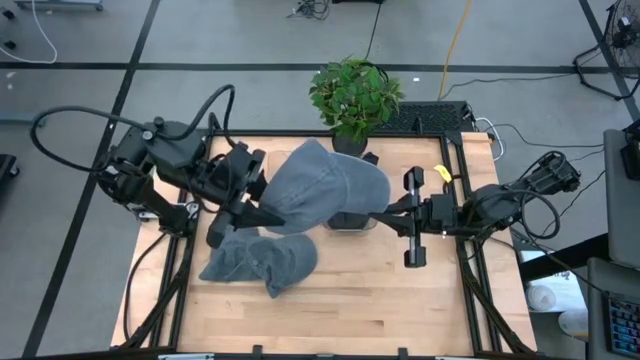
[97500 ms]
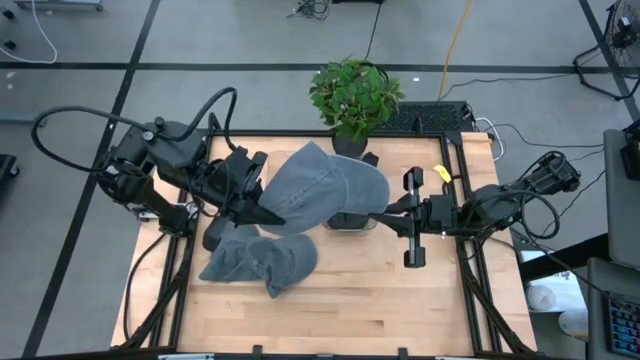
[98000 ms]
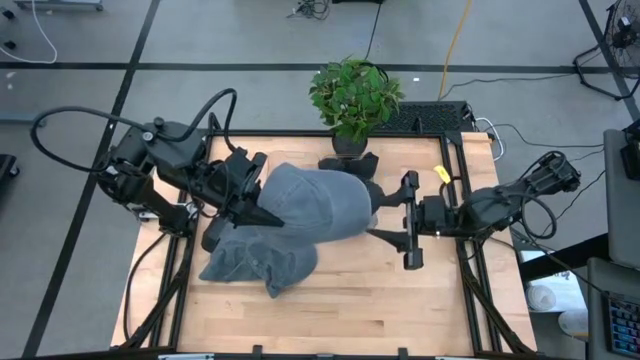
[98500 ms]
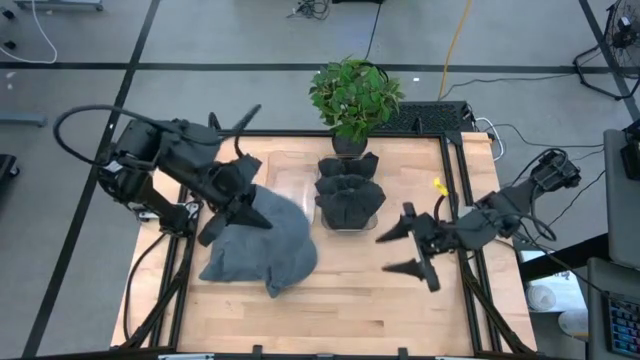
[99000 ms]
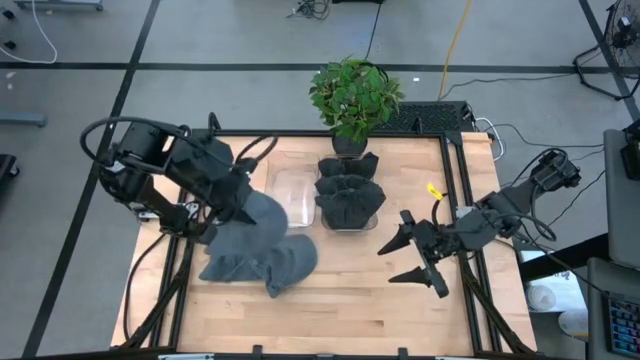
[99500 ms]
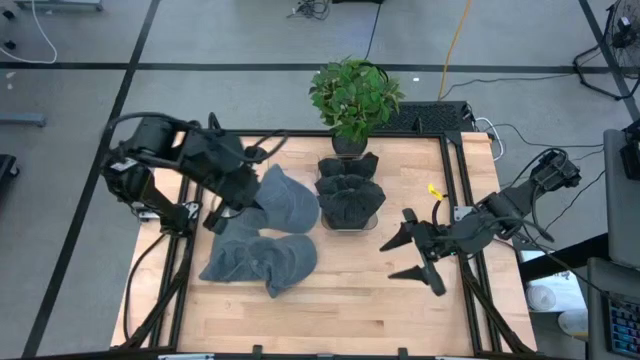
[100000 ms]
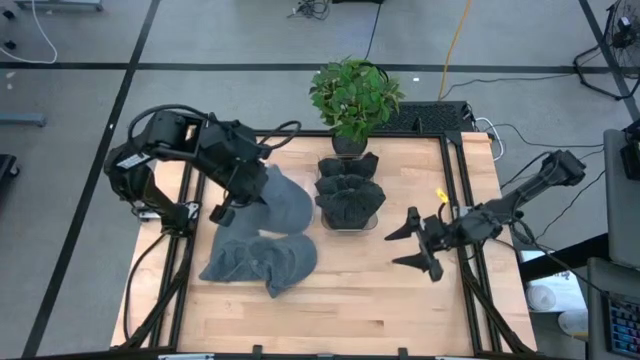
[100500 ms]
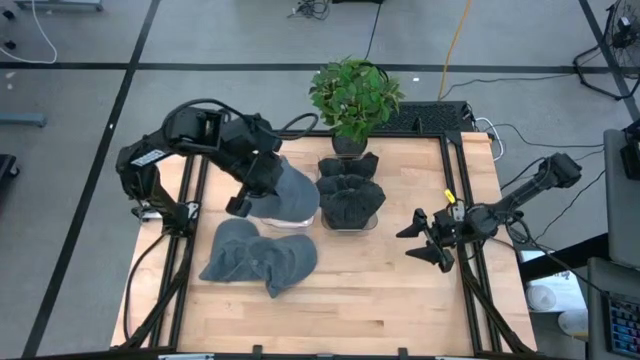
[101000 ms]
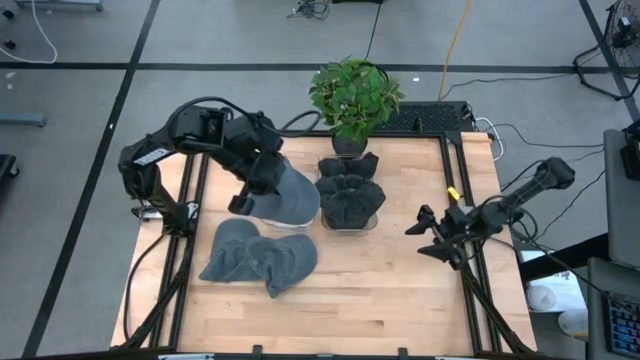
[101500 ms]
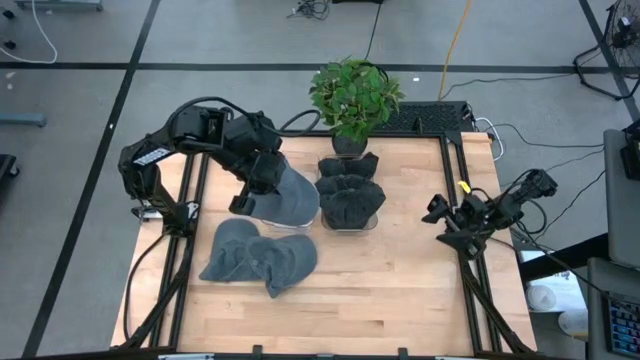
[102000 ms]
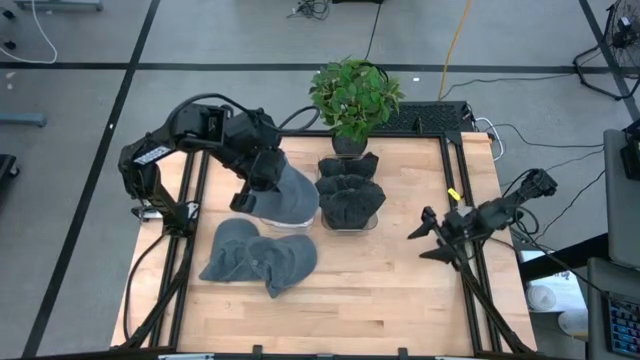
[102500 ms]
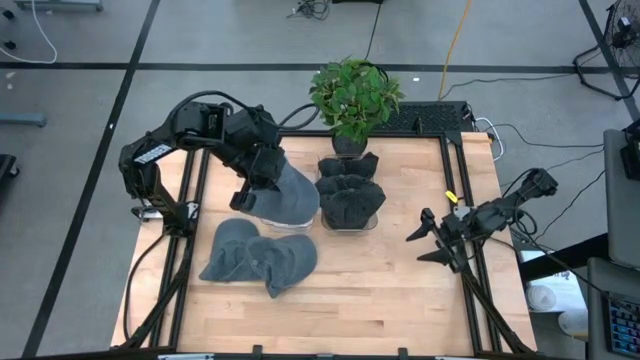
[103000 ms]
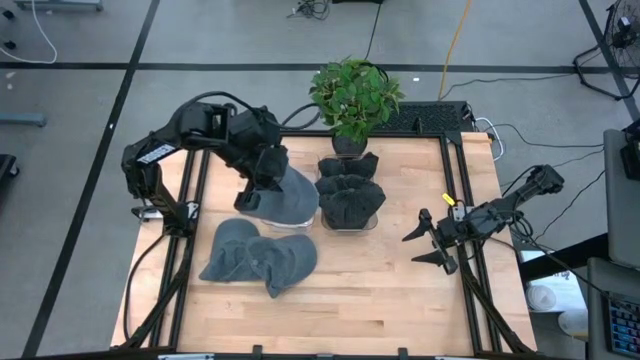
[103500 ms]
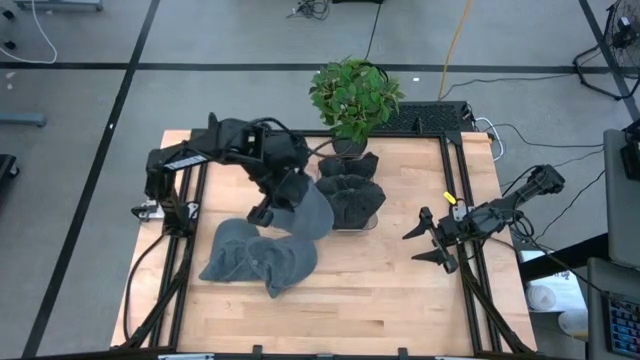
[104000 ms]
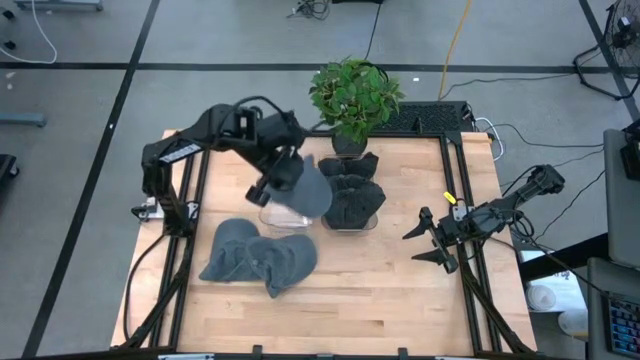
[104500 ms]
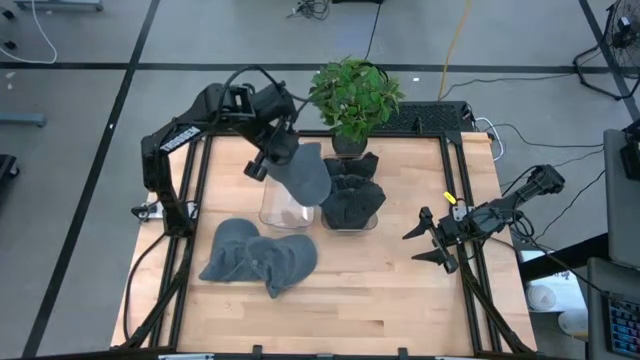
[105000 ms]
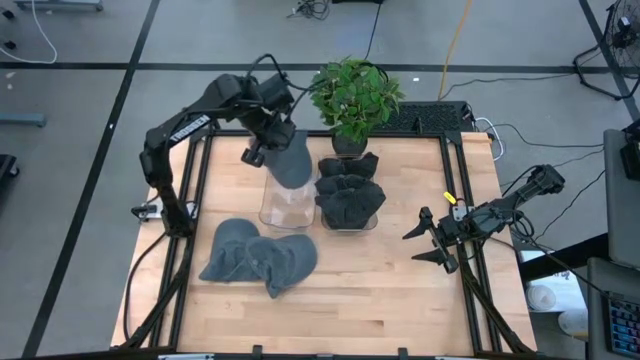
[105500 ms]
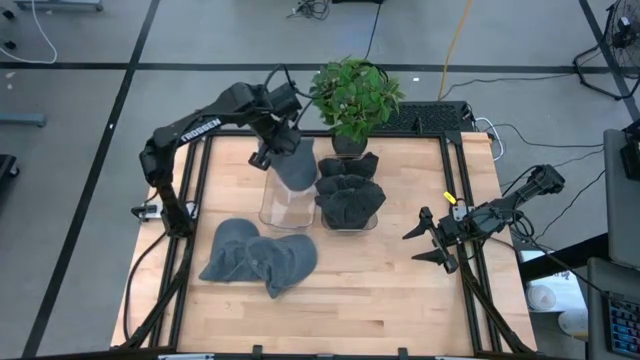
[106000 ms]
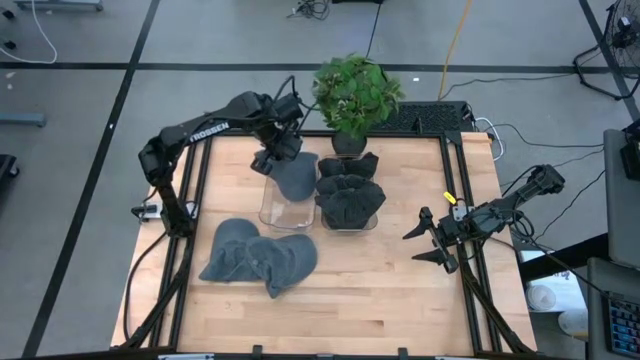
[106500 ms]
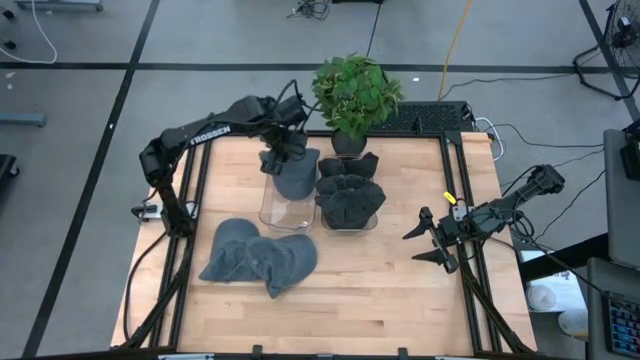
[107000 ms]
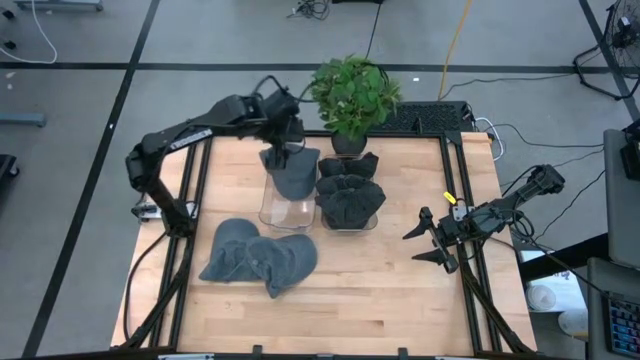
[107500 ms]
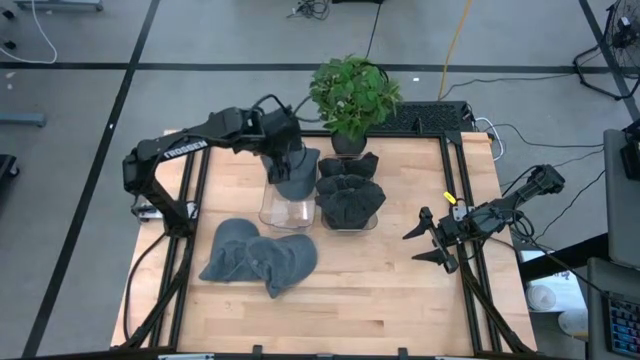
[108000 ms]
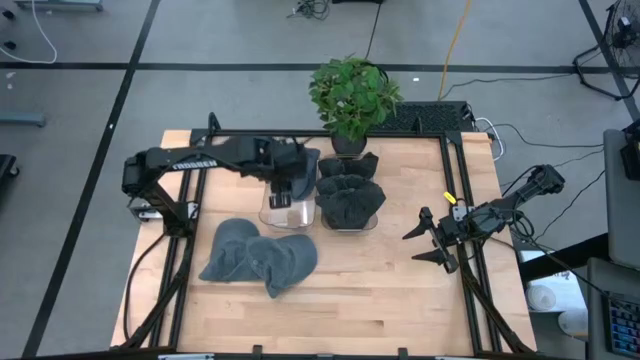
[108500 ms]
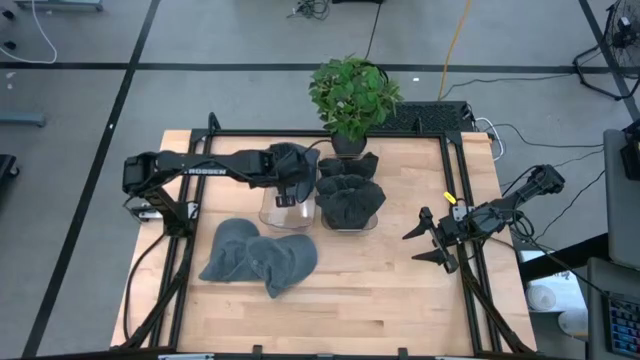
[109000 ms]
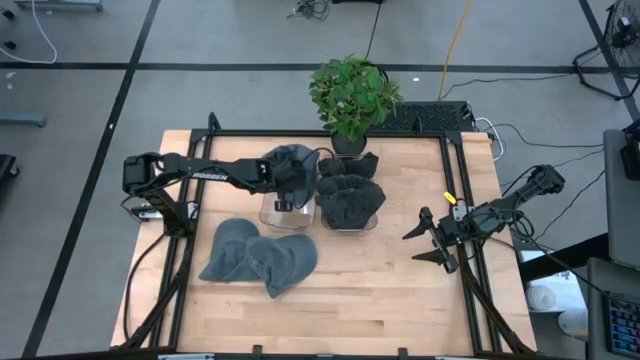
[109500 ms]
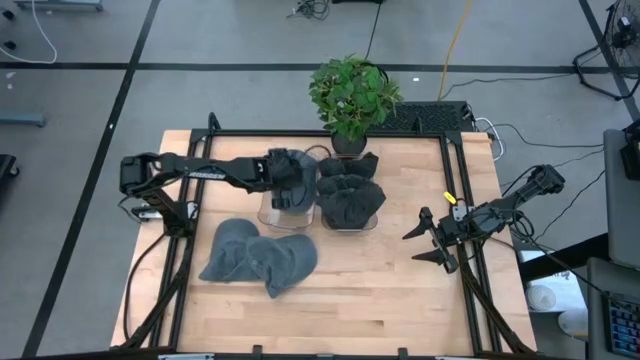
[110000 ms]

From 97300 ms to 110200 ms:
Task: Pick & Place hat
Put the right blue cap into the left transparent bin

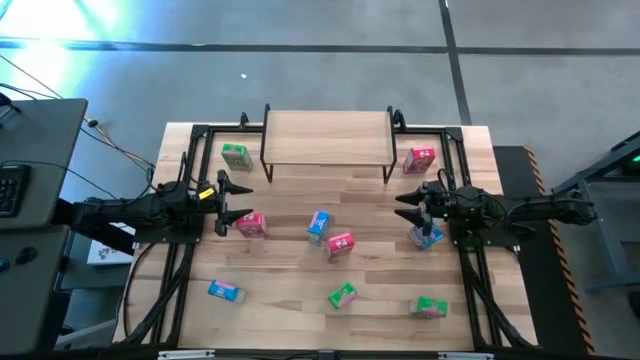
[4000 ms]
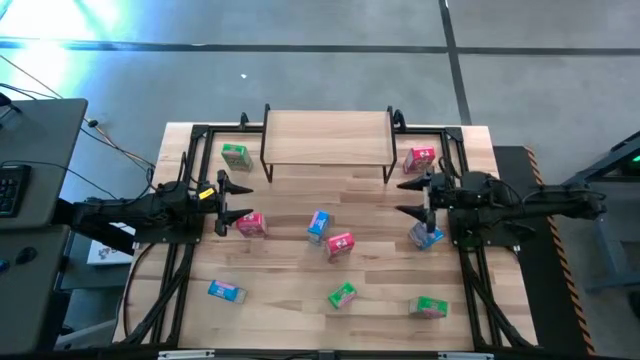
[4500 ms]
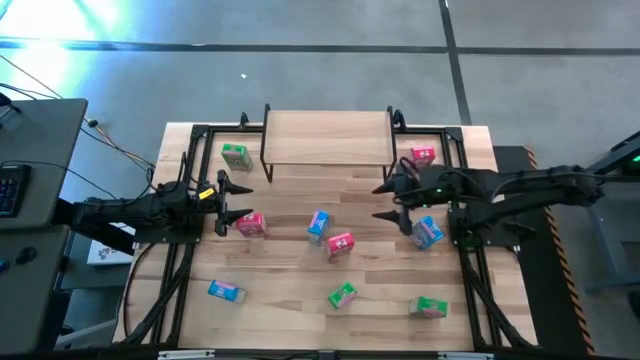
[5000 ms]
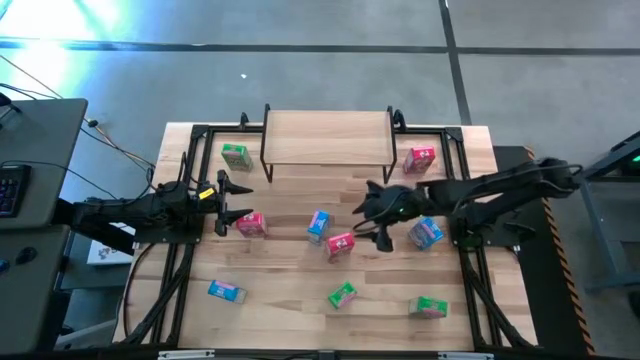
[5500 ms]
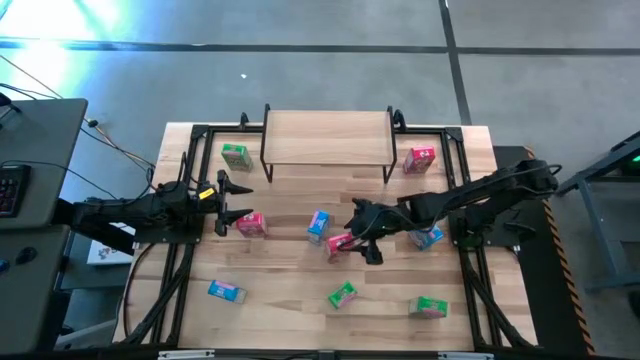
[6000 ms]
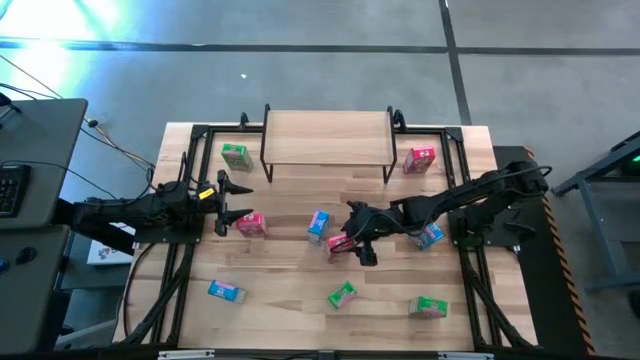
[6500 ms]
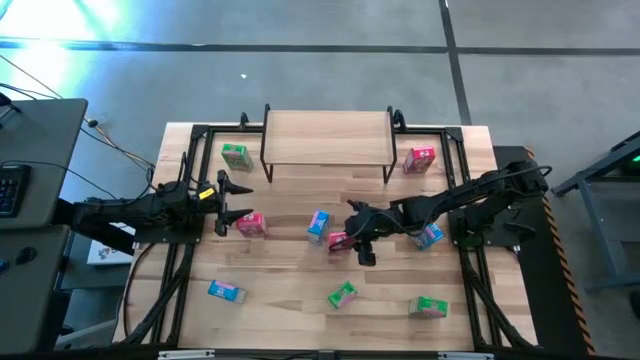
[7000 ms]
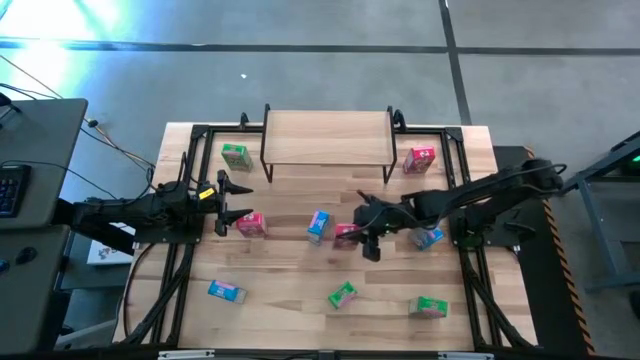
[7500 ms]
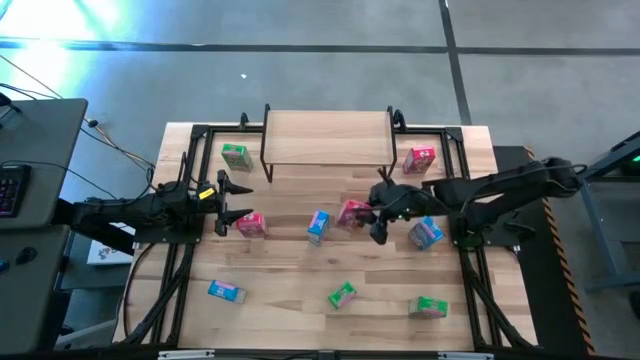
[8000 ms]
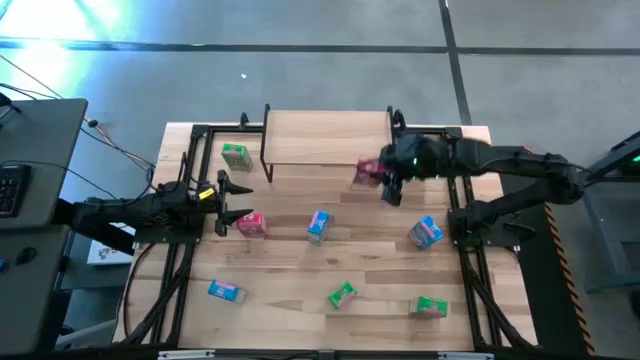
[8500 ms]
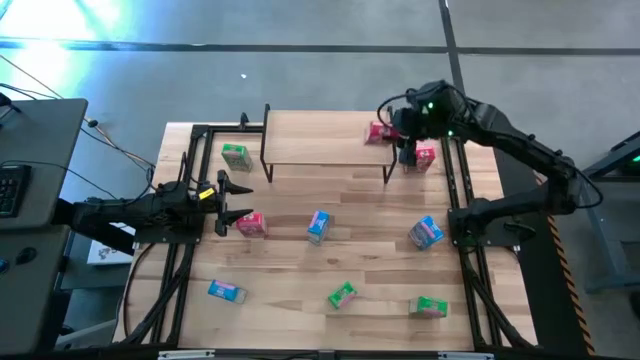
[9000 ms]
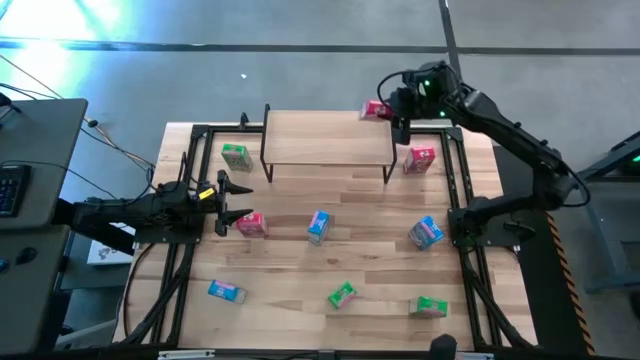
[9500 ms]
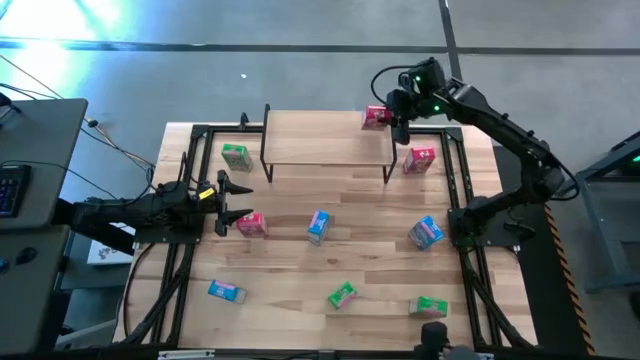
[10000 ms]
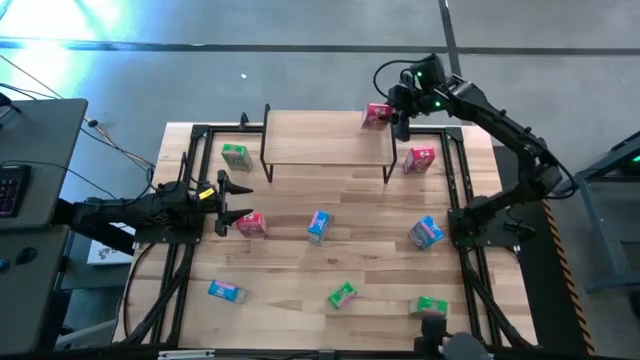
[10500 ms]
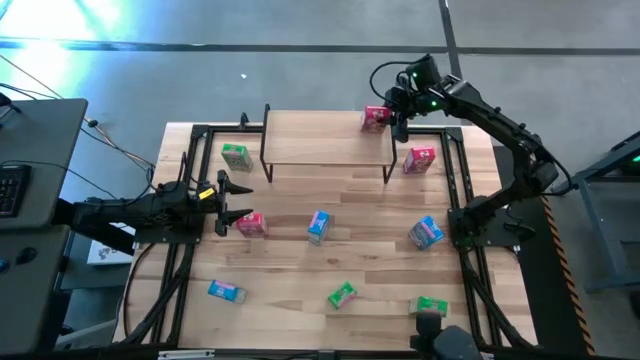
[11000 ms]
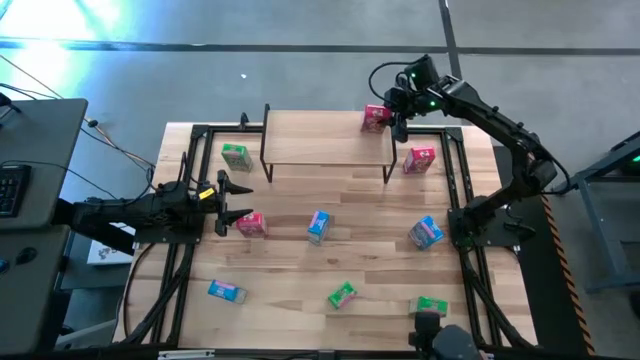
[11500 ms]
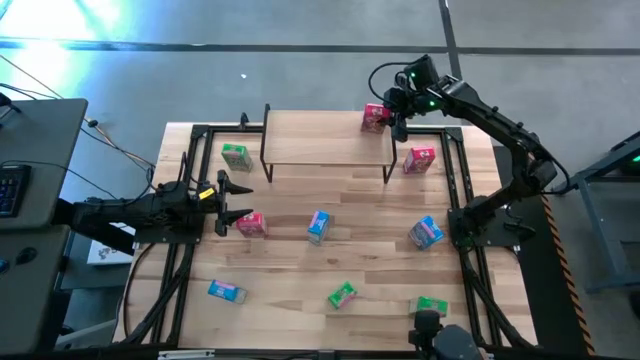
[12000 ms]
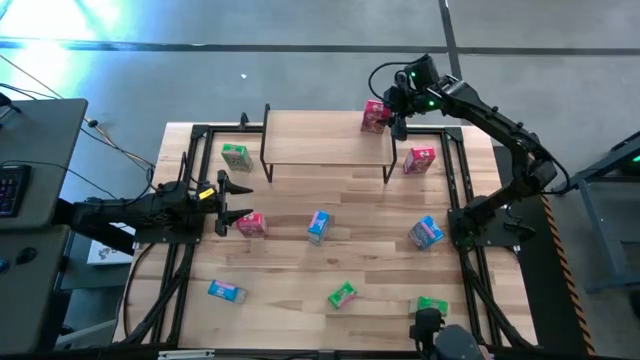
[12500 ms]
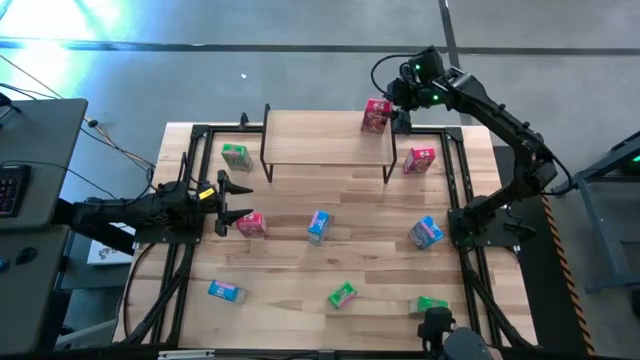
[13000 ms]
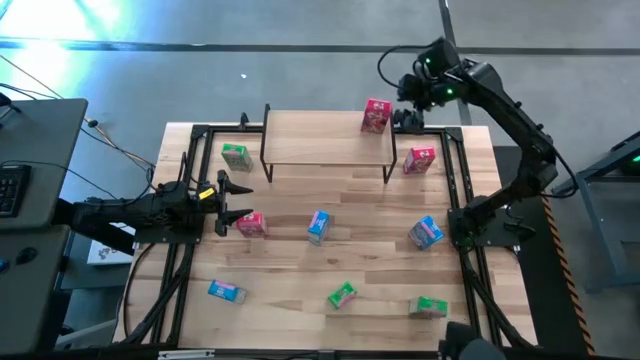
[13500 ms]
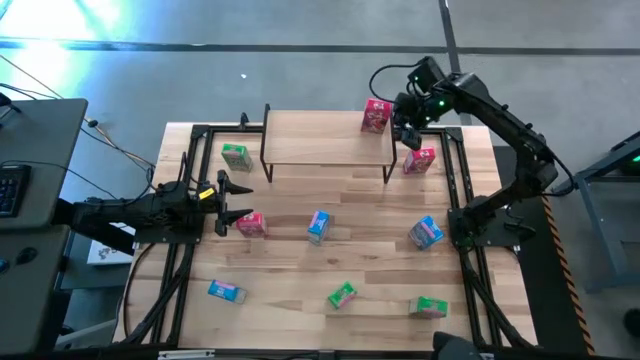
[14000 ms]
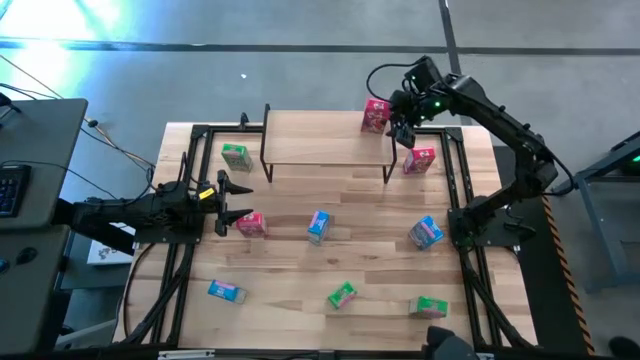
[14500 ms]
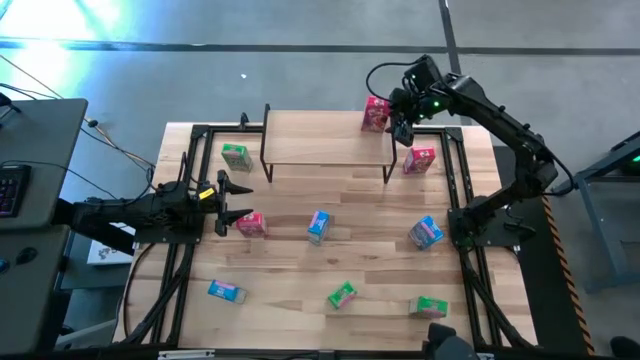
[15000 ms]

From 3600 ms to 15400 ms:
Task: Stack cereal on shelf
Put the bottom right red cereal box on the shelf
